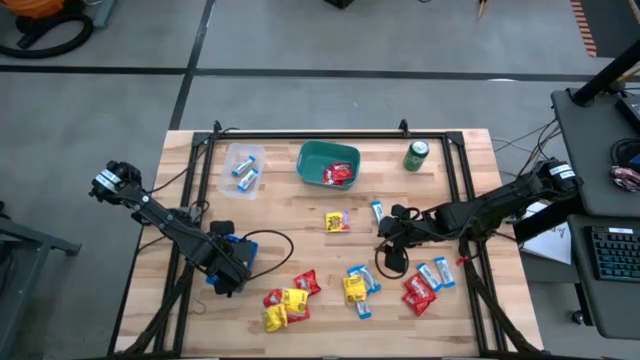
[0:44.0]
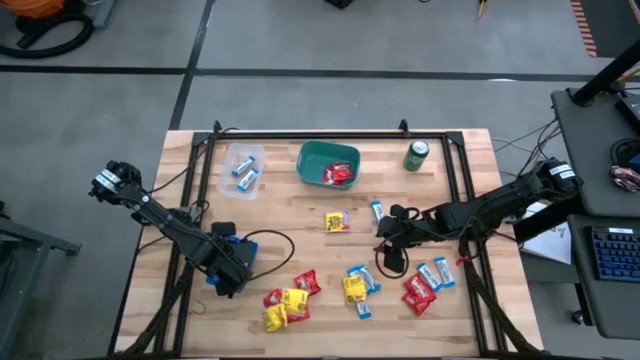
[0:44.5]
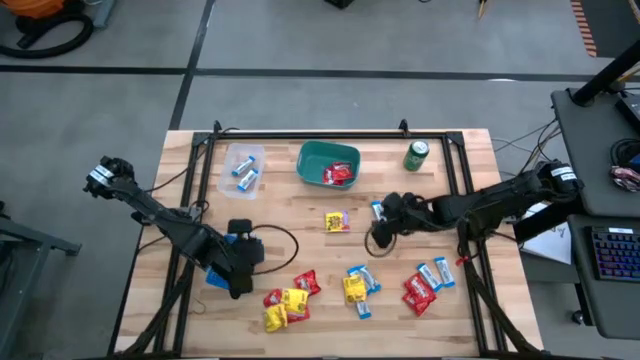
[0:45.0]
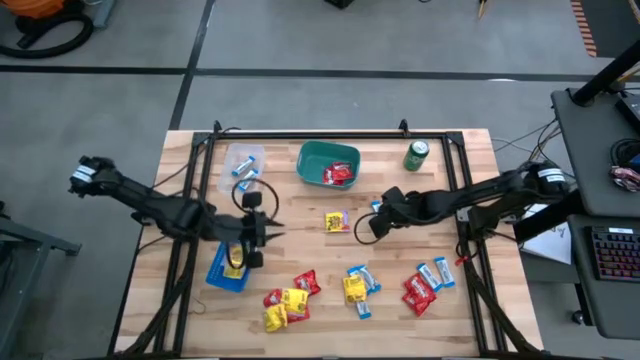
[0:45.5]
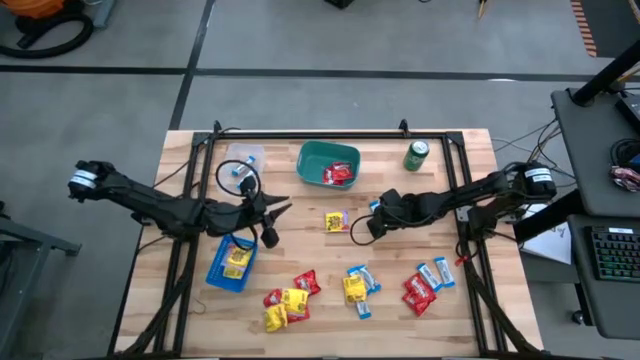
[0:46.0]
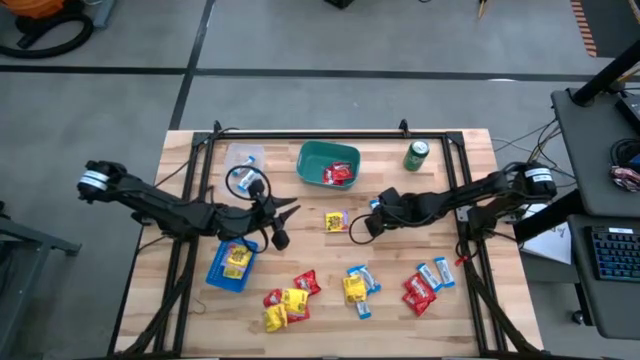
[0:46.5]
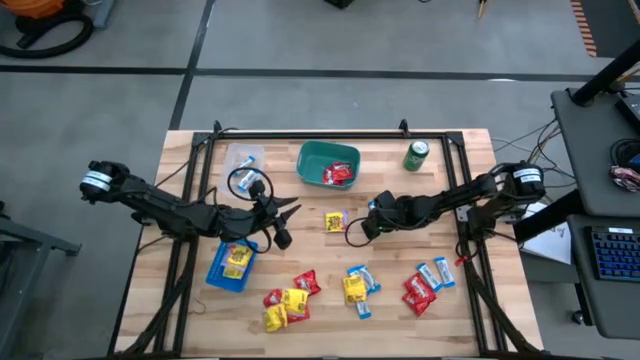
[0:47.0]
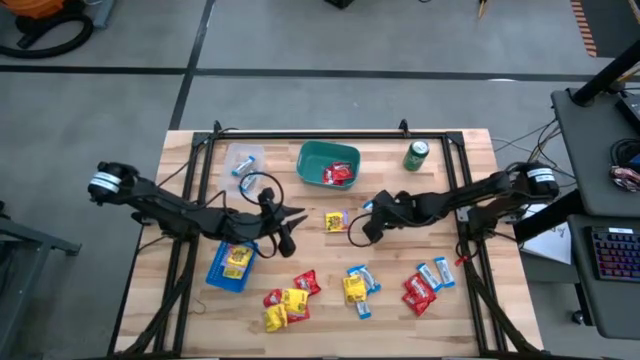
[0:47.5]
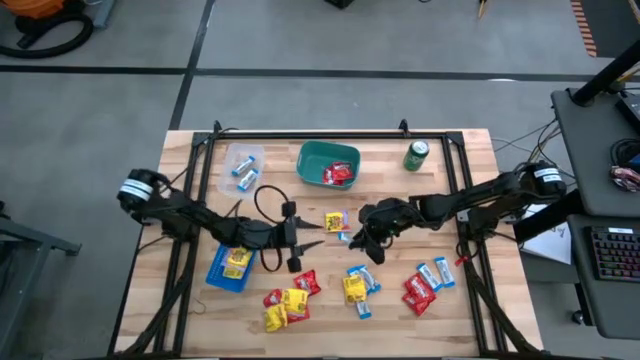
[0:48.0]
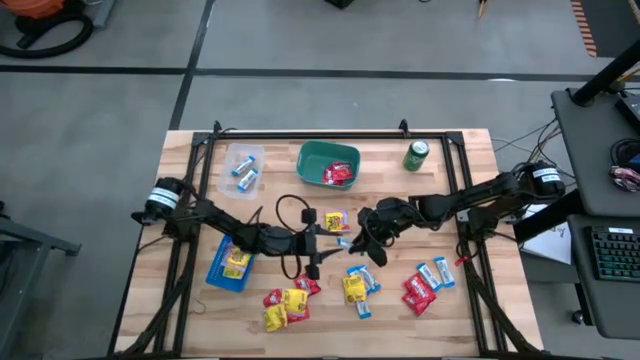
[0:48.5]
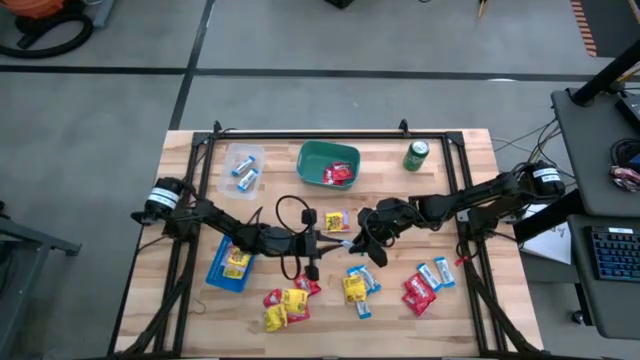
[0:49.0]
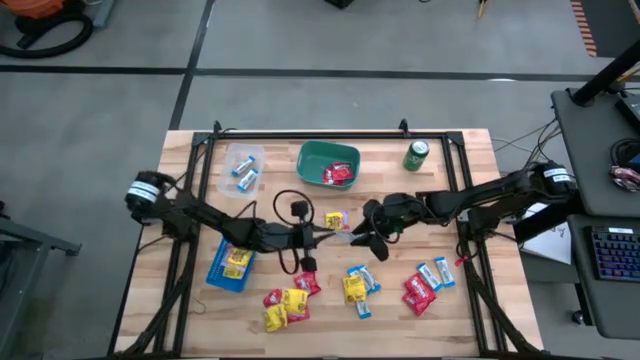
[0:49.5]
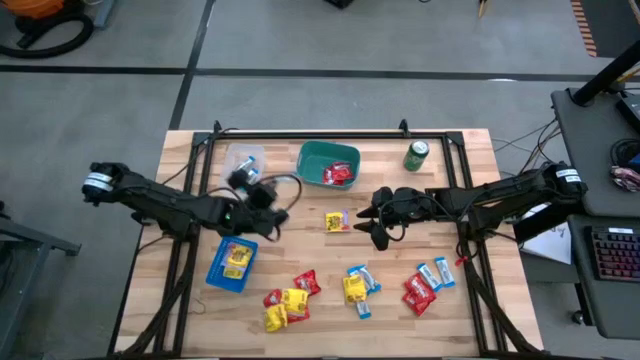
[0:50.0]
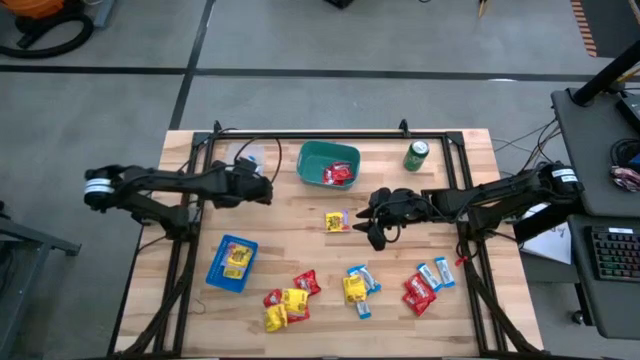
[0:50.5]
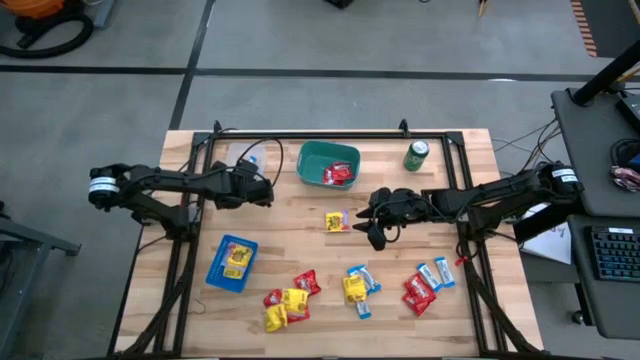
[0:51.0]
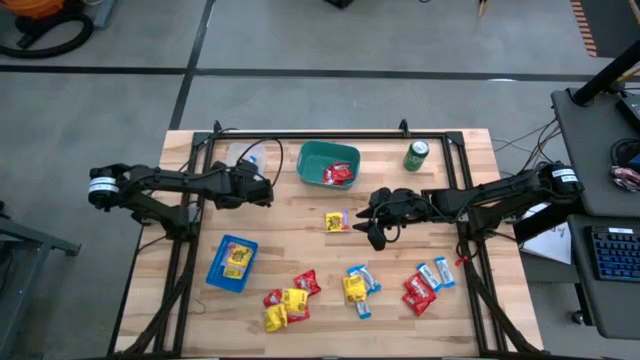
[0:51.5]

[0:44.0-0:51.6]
Task: Sort candy
Put the white candy into the transparent bin

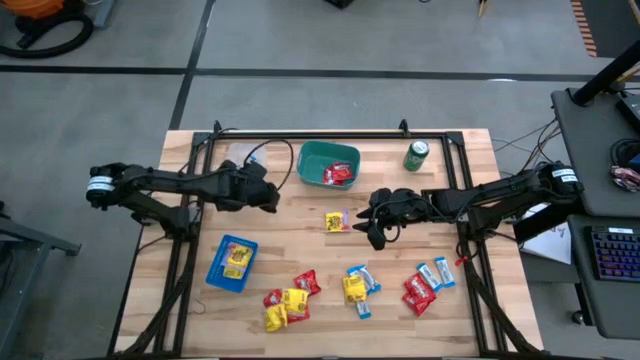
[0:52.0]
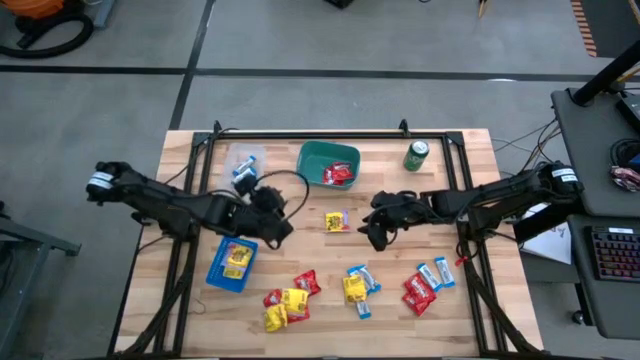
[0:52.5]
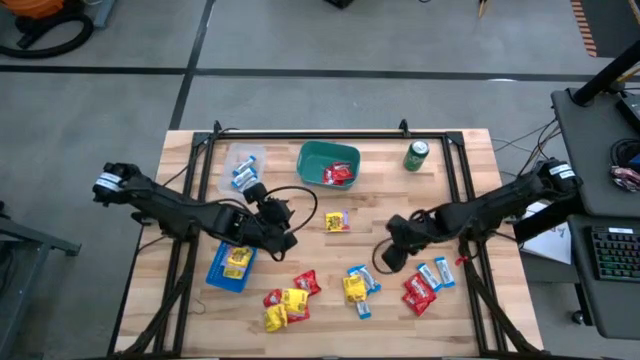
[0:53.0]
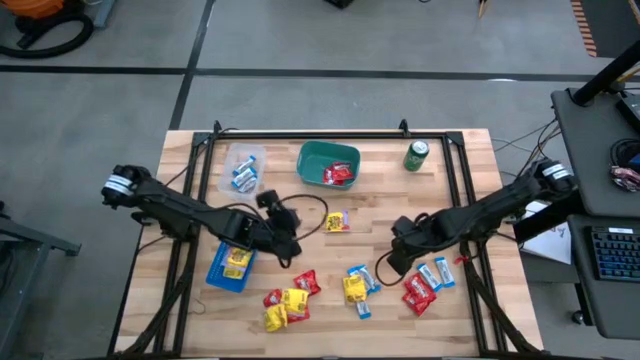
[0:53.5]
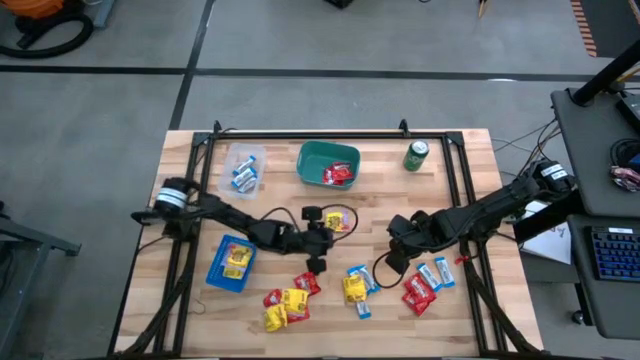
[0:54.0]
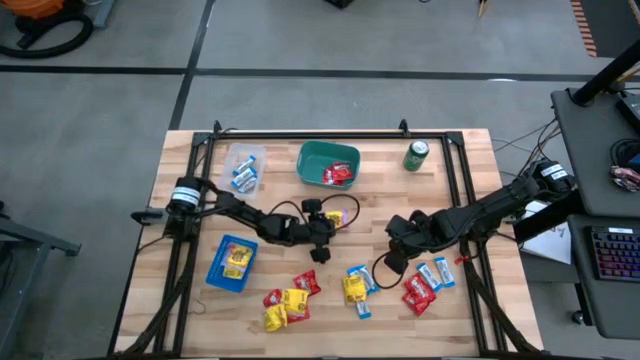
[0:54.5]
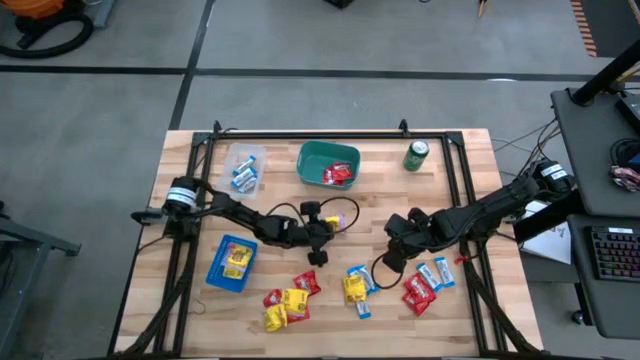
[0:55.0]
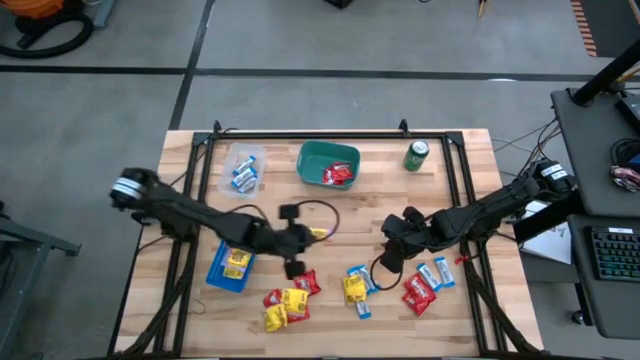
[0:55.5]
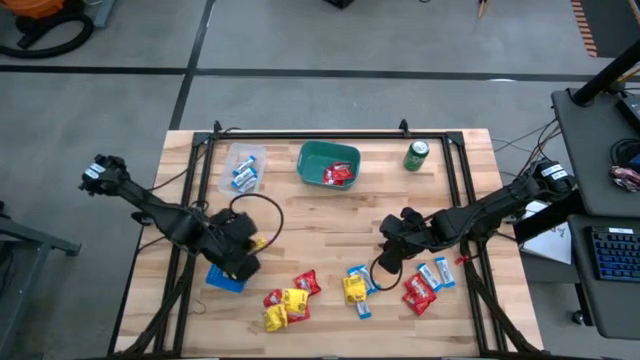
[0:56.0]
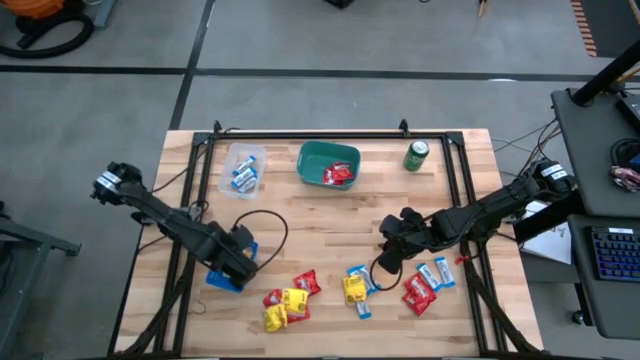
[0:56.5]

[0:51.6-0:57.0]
Put the yellow candy into the blue basket

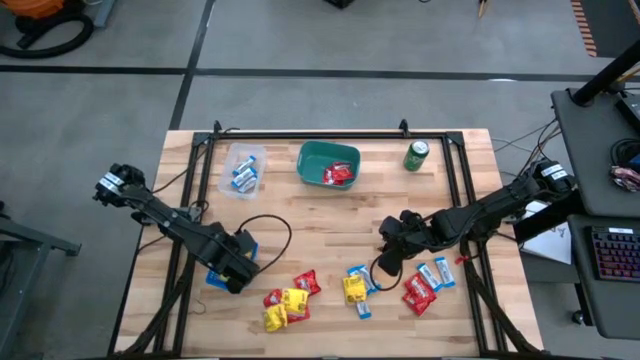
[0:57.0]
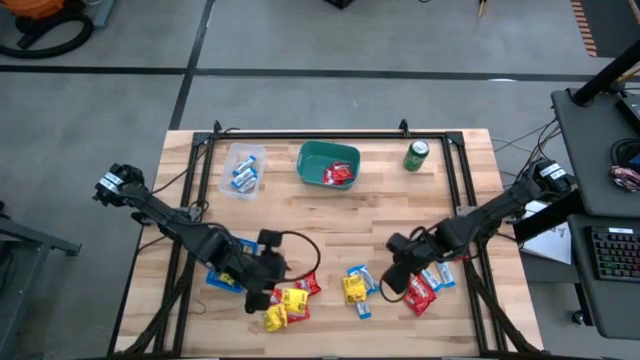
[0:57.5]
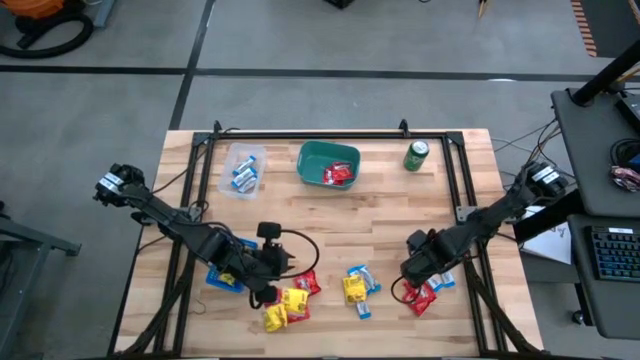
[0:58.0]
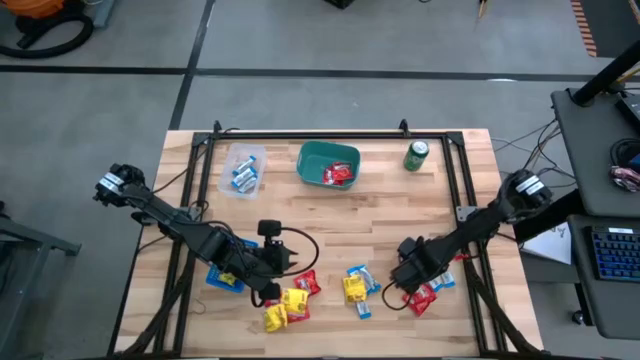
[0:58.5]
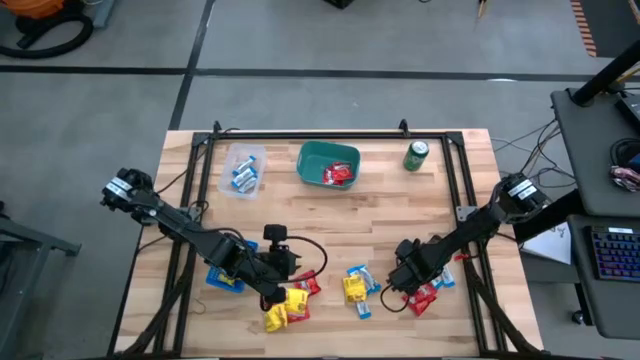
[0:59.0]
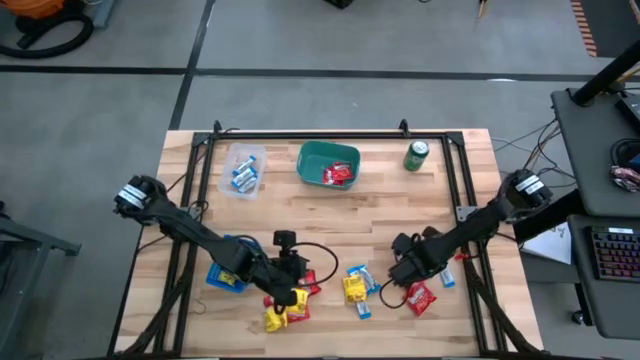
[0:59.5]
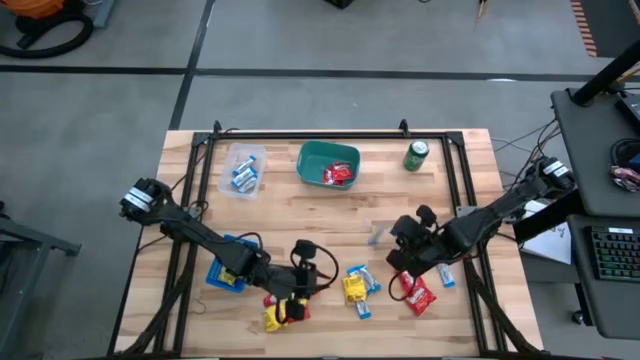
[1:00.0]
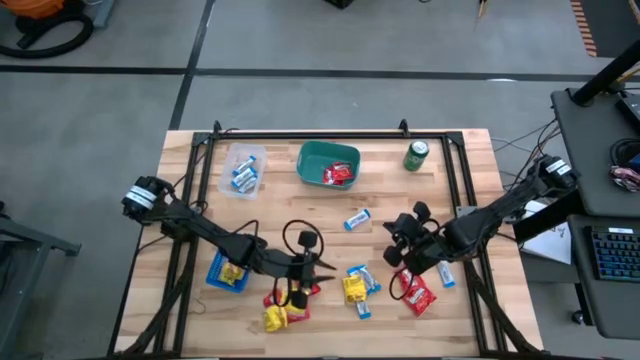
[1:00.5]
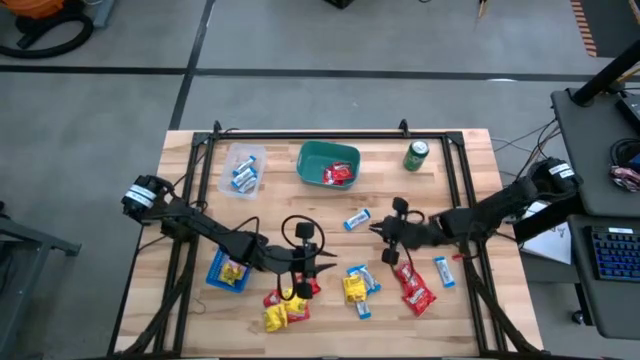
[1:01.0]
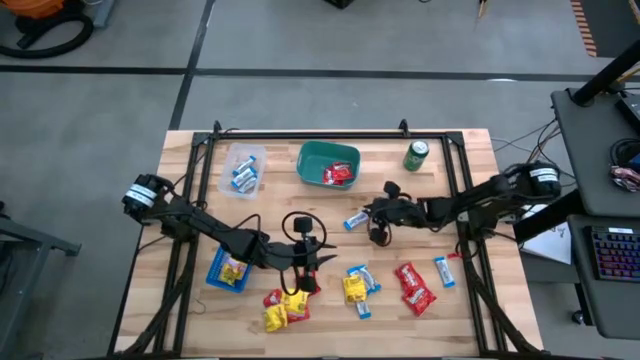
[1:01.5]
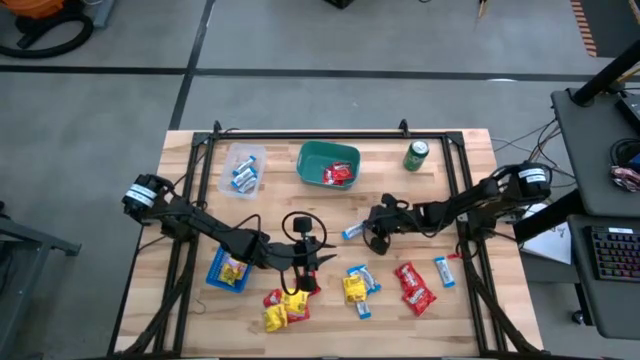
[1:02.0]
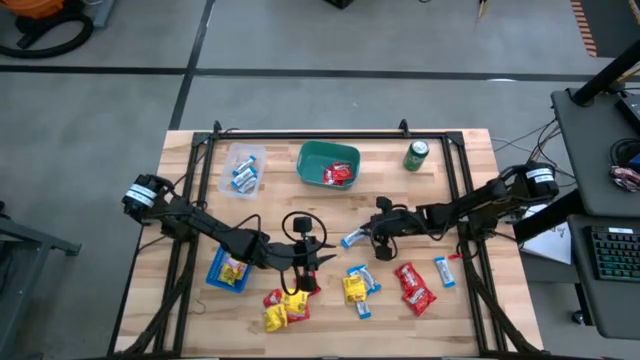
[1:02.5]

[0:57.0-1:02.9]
Put the white candy into the transparent bin

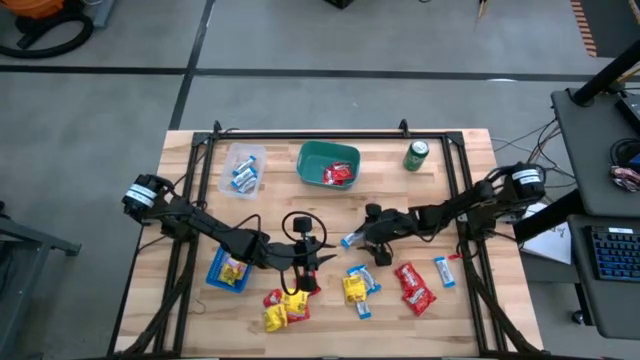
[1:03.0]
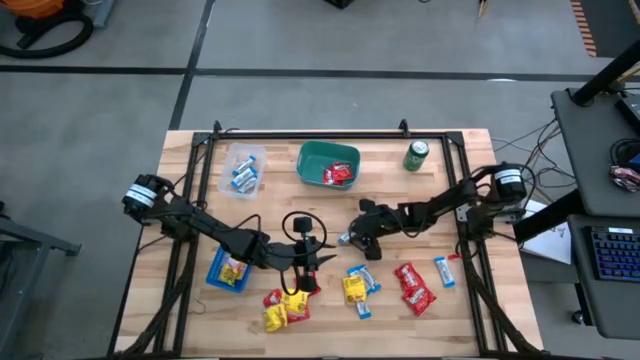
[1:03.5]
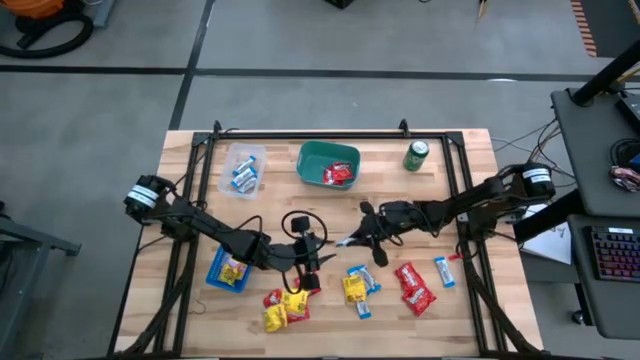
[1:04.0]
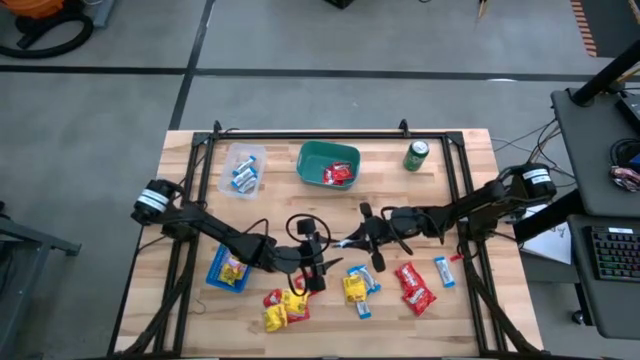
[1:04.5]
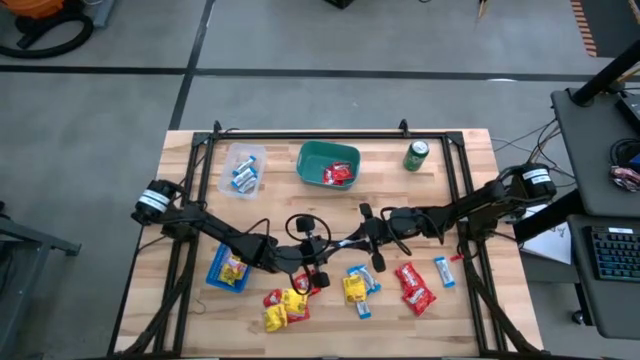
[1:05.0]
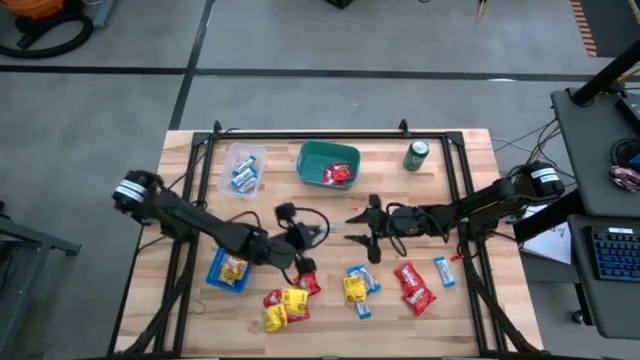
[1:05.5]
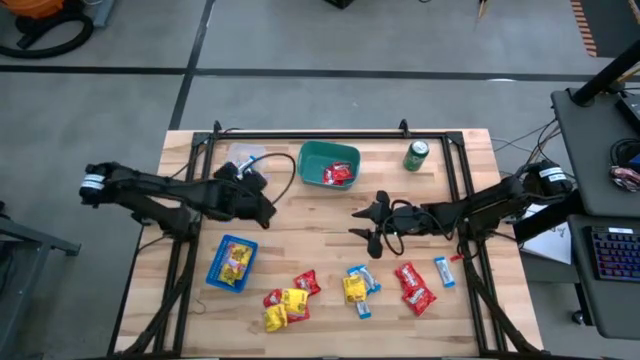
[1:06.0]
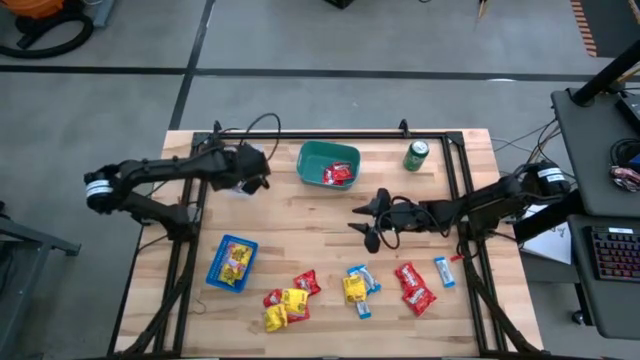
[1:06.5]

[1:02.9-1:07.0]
Put the white candy into the transparent bin
